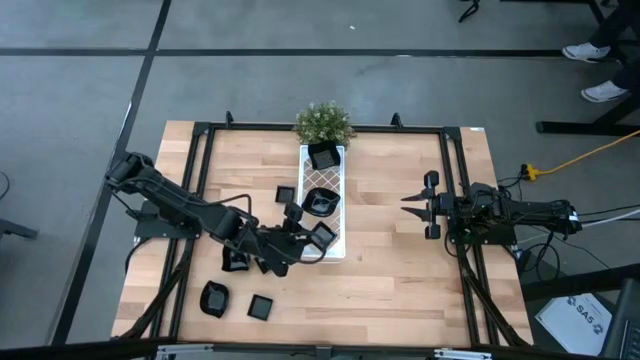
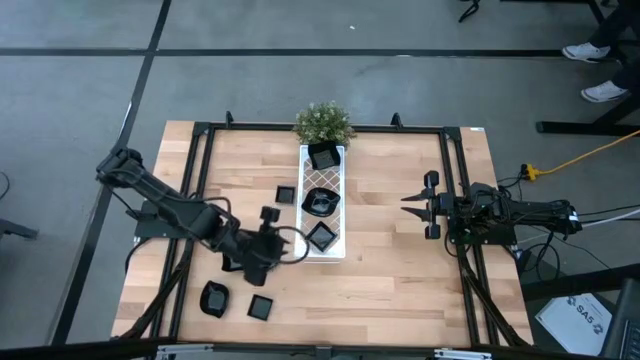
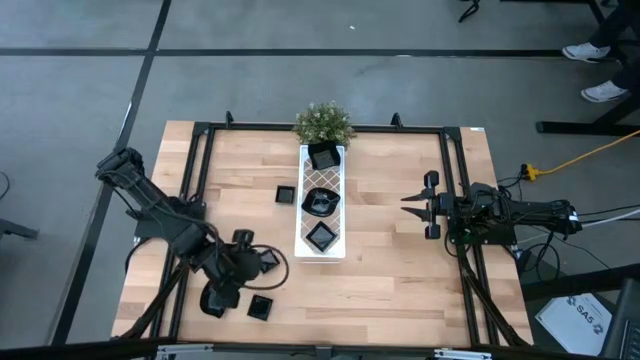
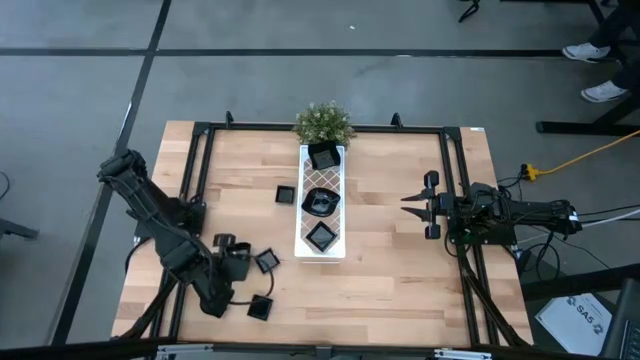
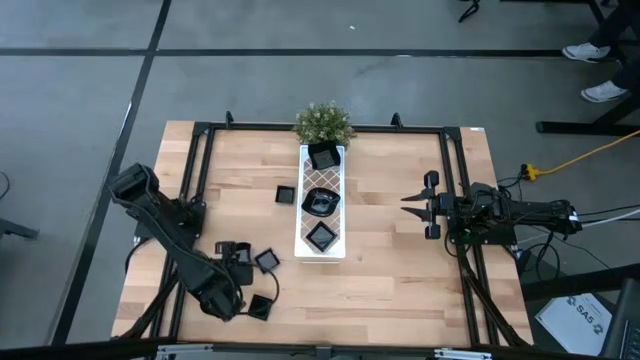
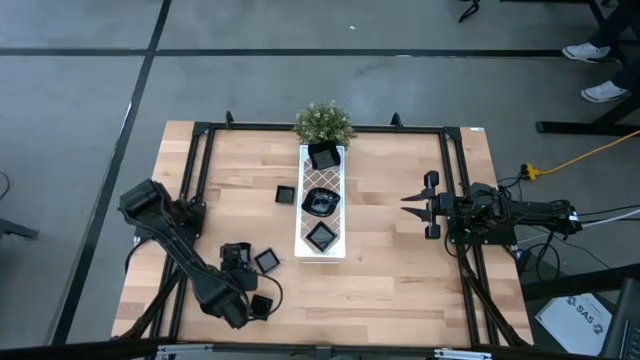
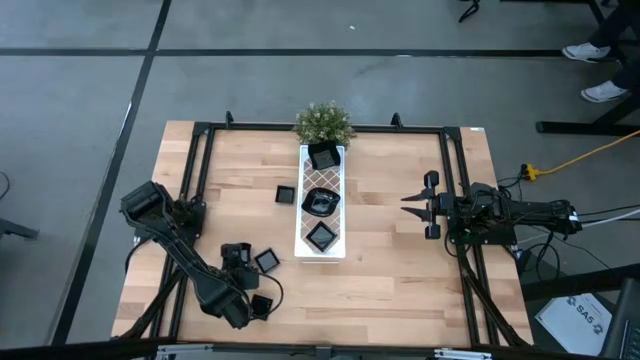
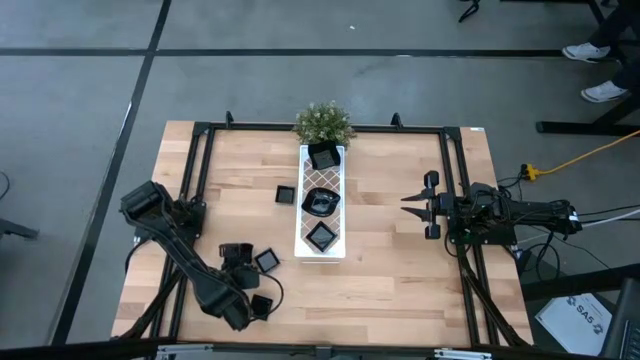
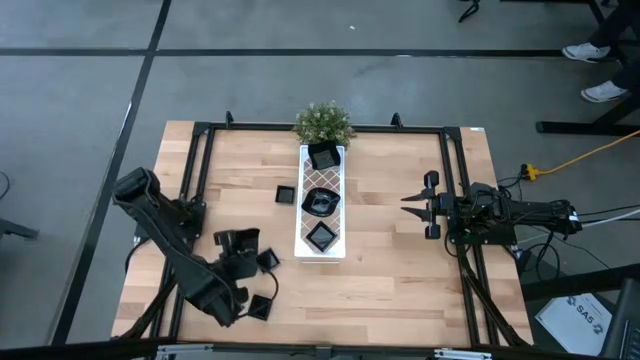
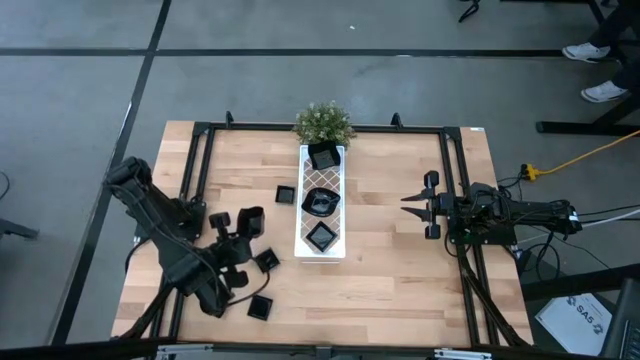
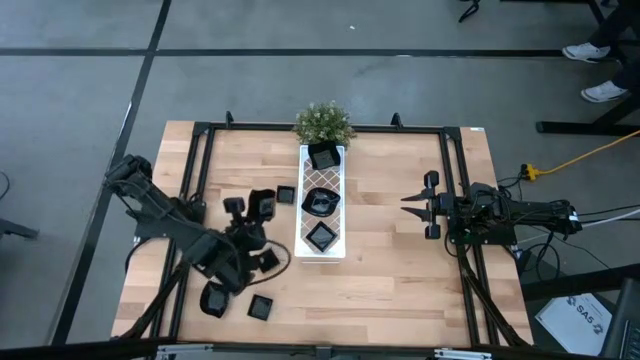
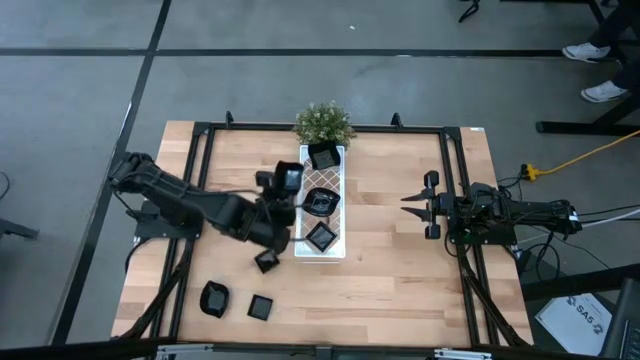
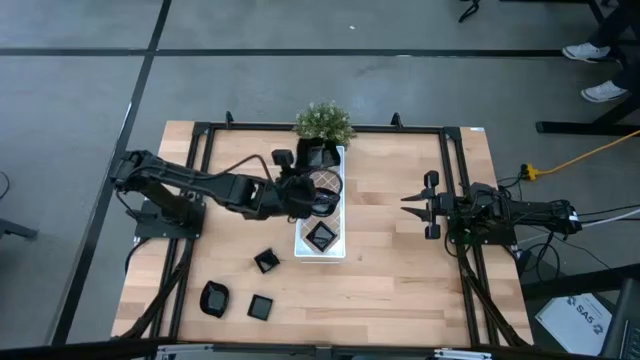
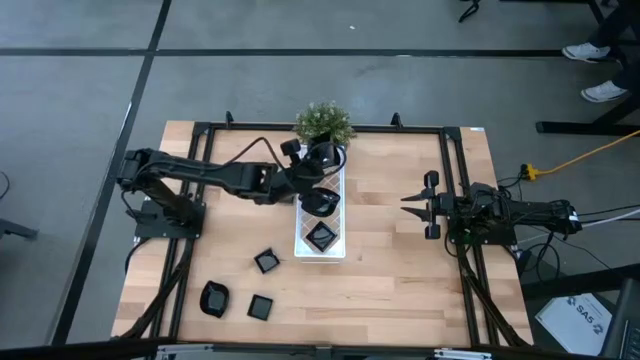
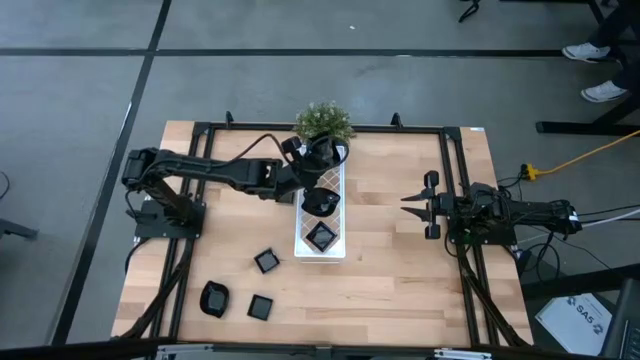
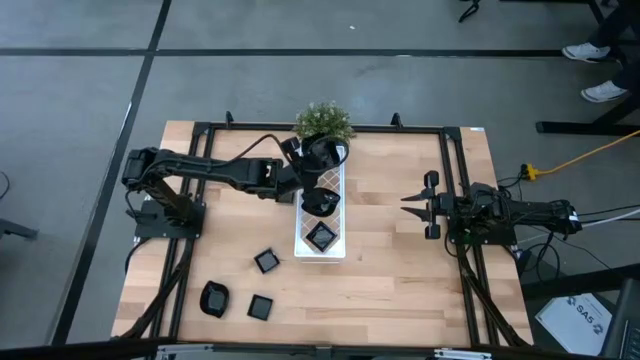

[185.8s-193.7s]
Task: Pick & Place Mini shaped plates
Stack the distorted square plate on top of the distorted square plate on the shelf

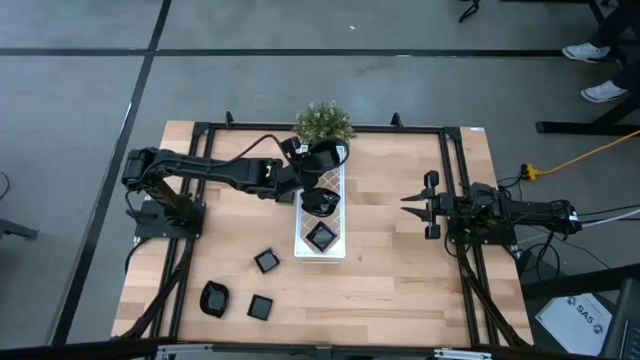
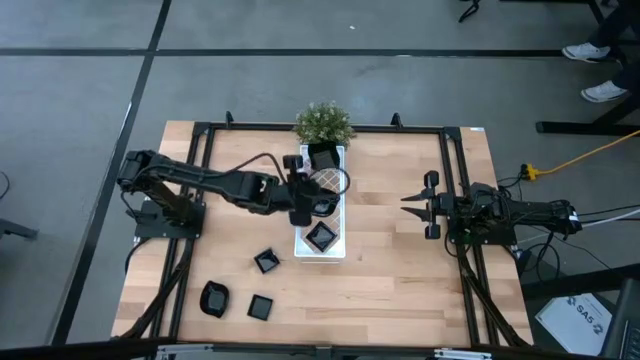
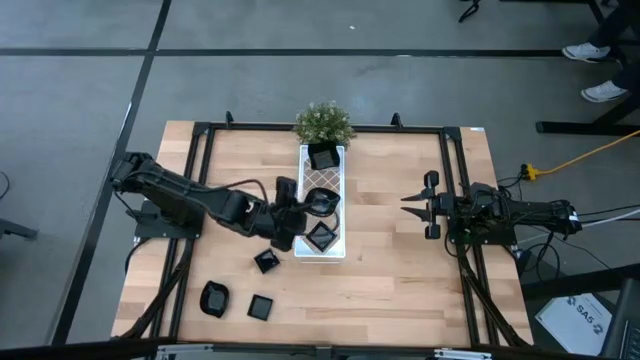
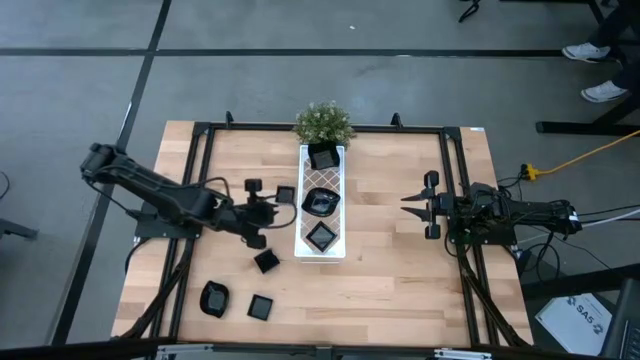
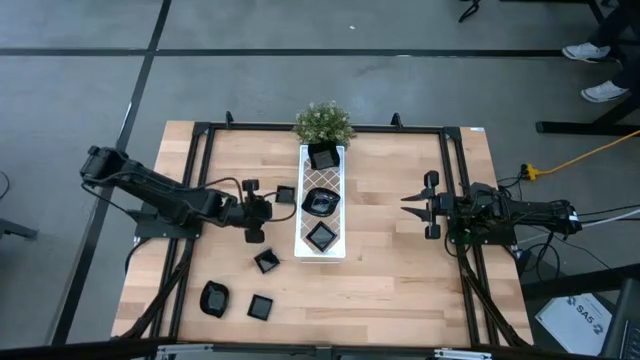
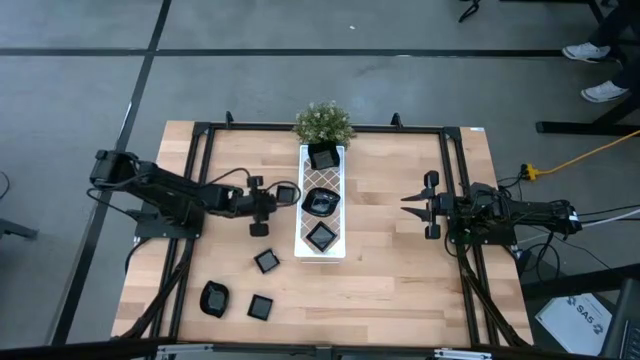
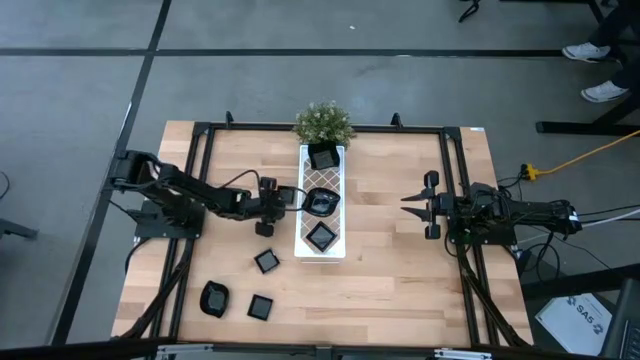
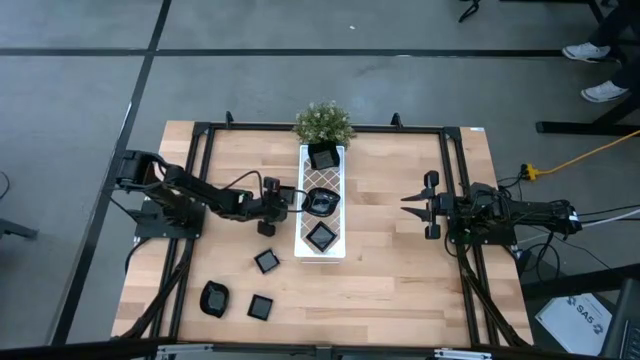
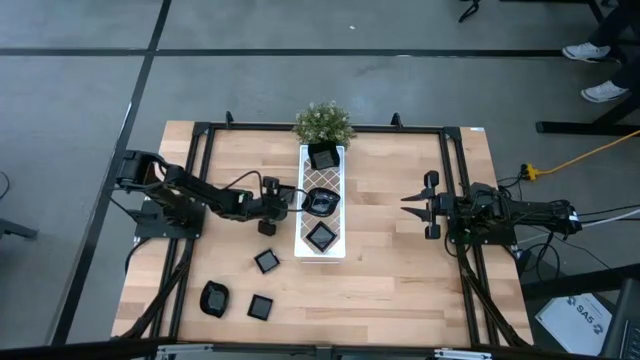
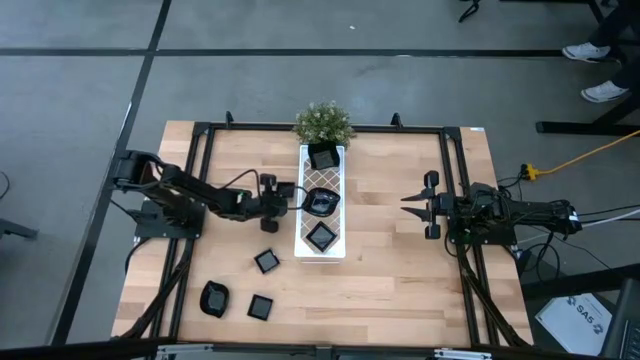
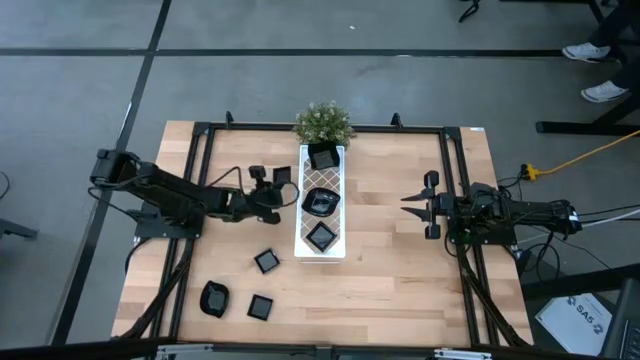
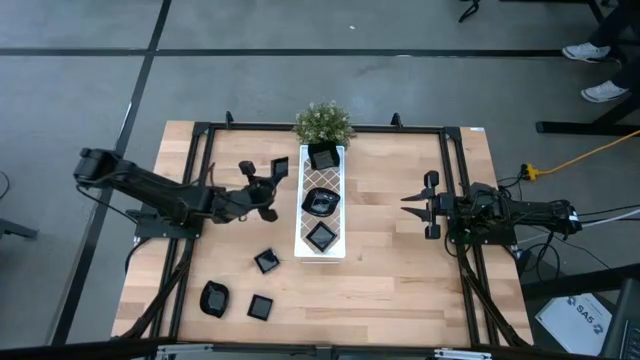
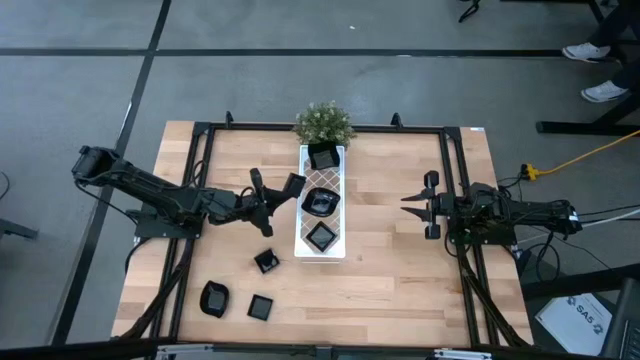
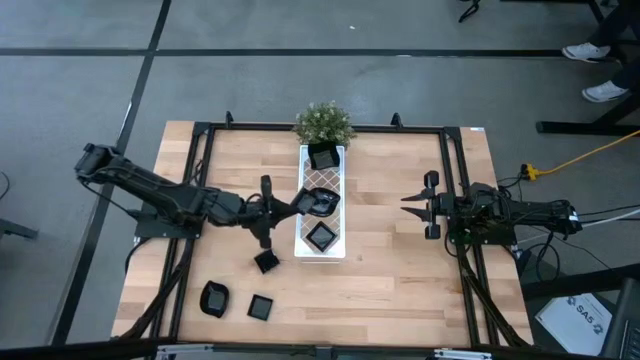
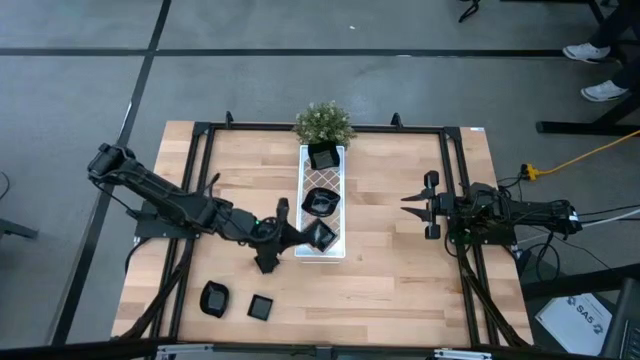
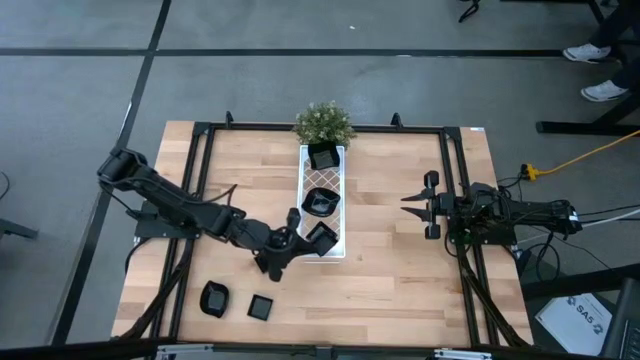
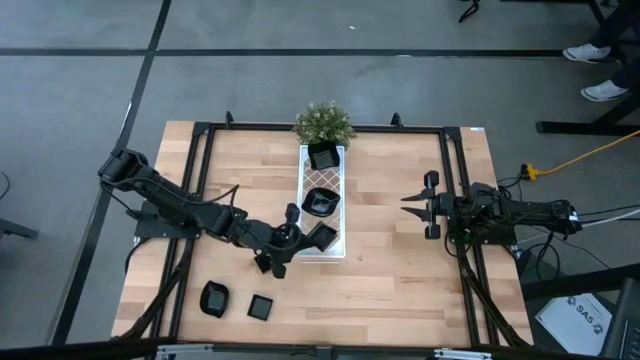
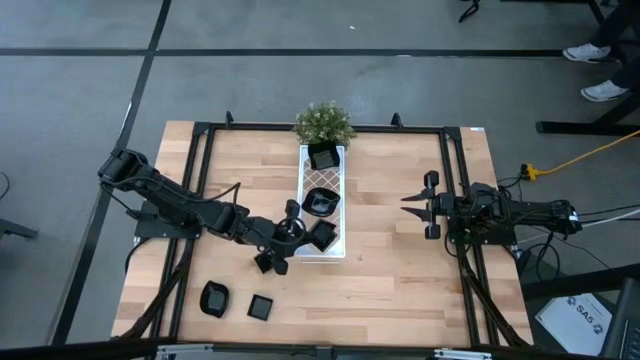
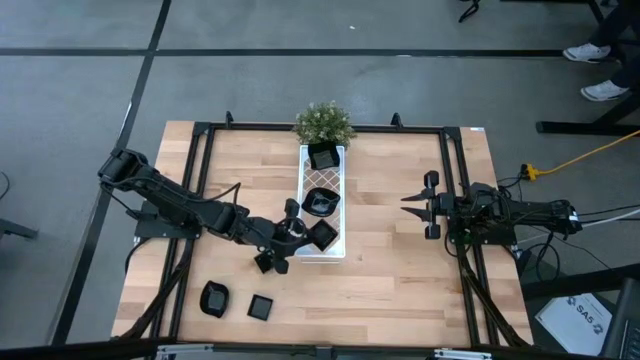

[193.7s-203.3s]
Stack the square plate on top of the square plate on the shelf

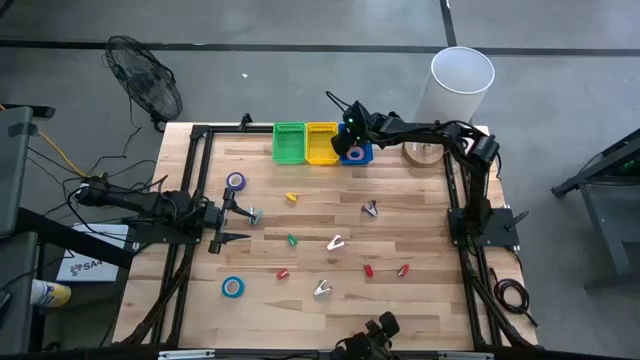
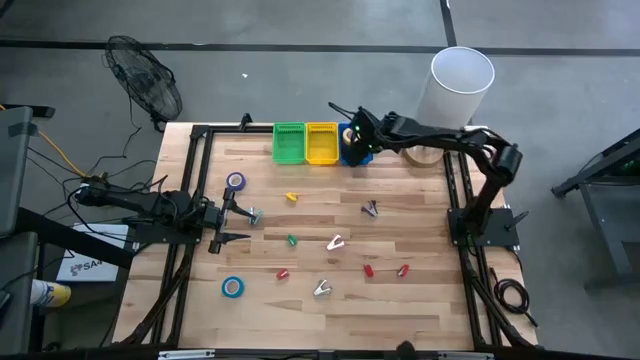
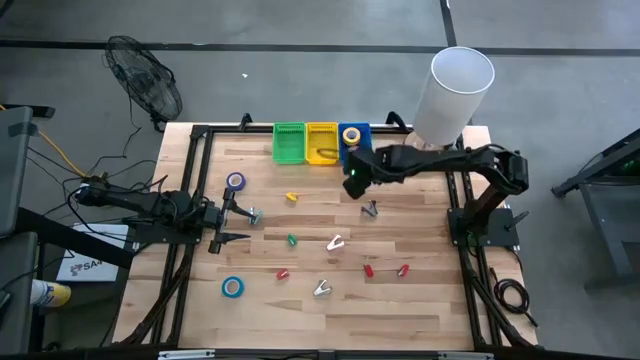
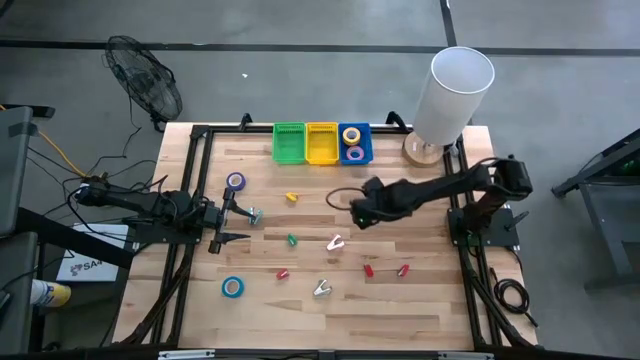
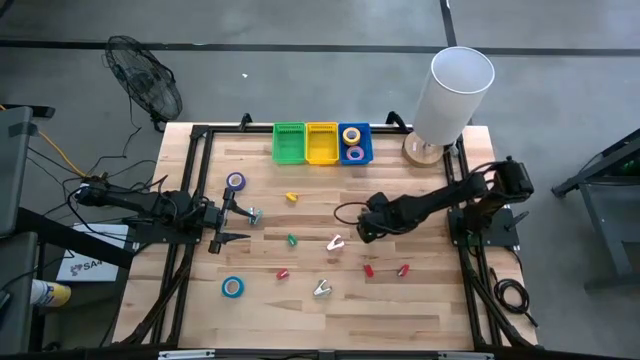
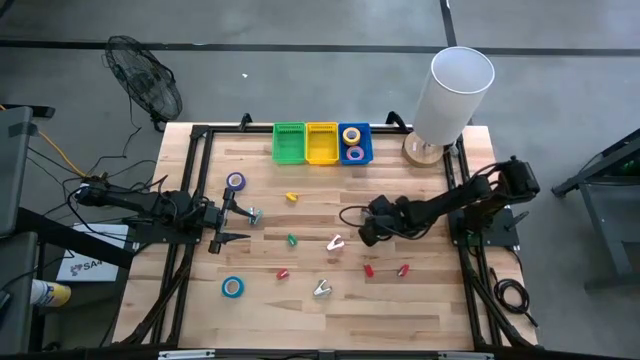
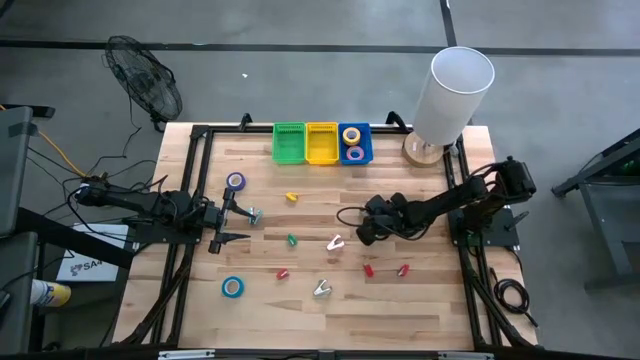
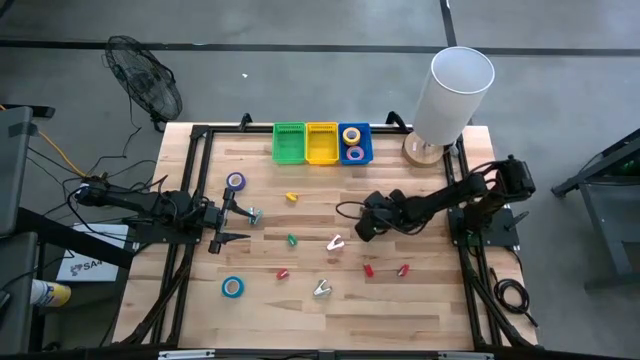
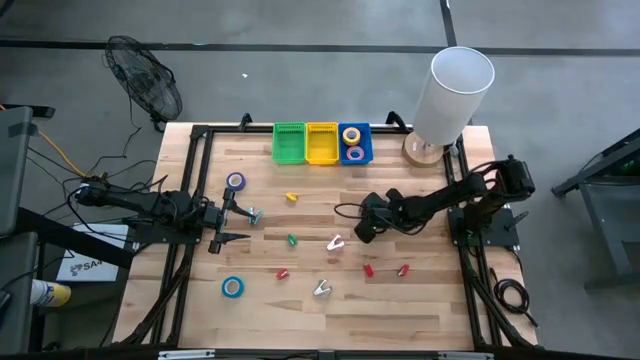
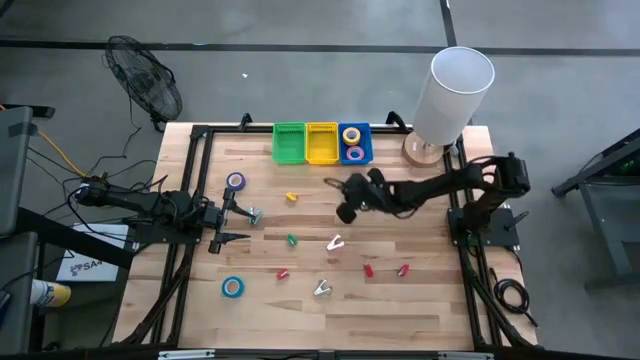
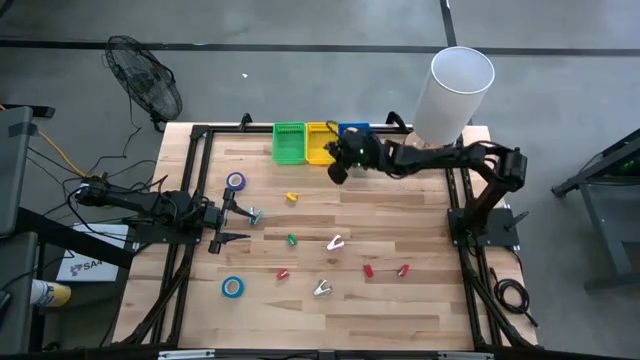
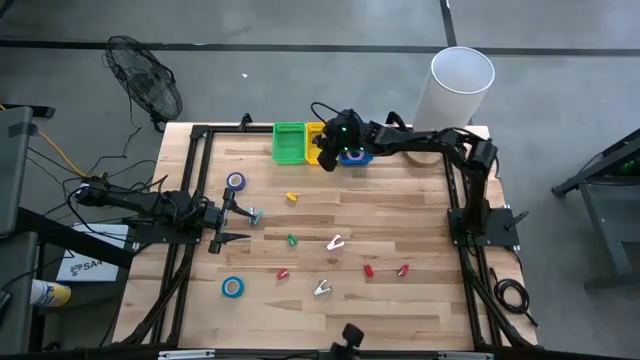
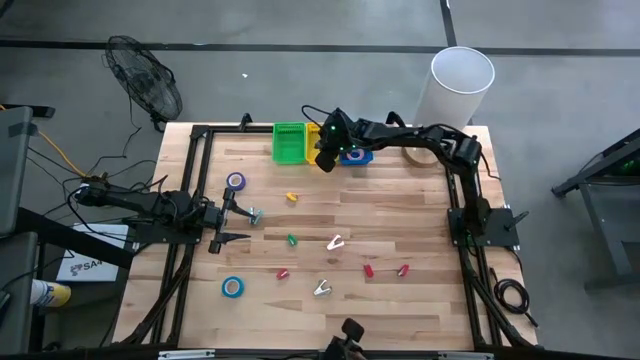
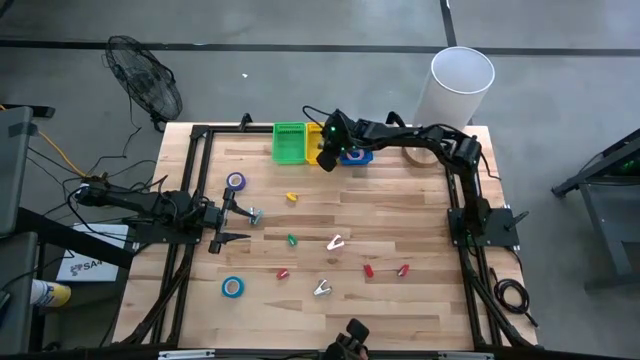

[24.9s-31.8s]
Task: Pick and place Stapler, Stapler remover, tape
Put the black staple remover into the yellow bin
